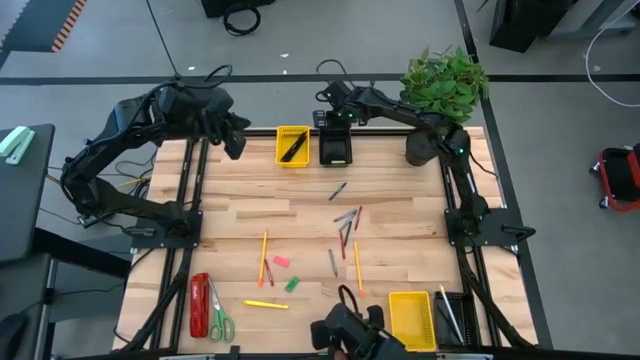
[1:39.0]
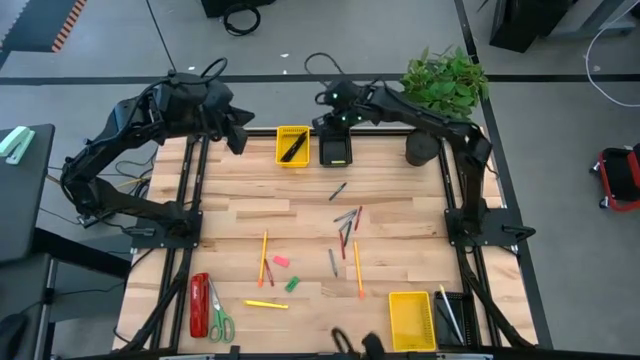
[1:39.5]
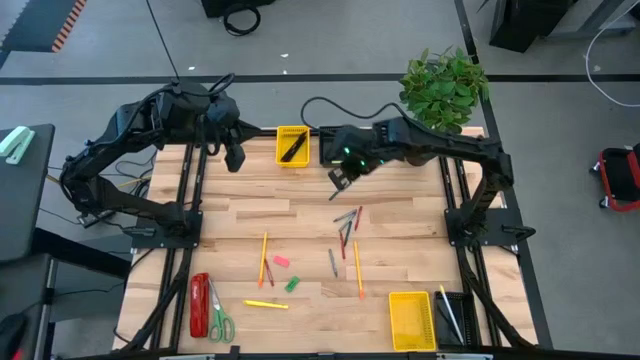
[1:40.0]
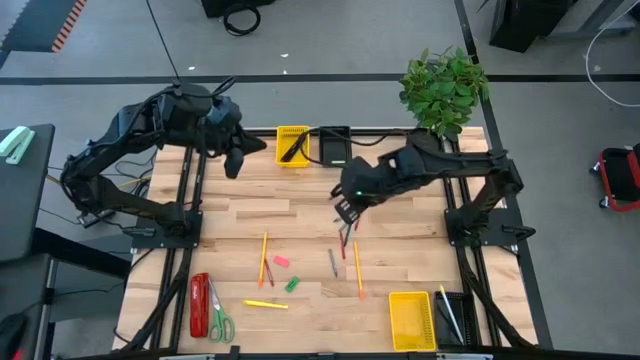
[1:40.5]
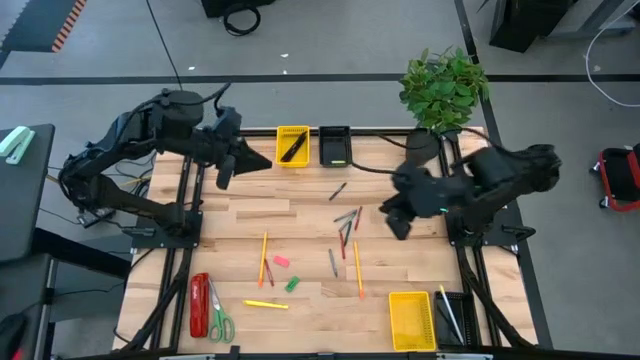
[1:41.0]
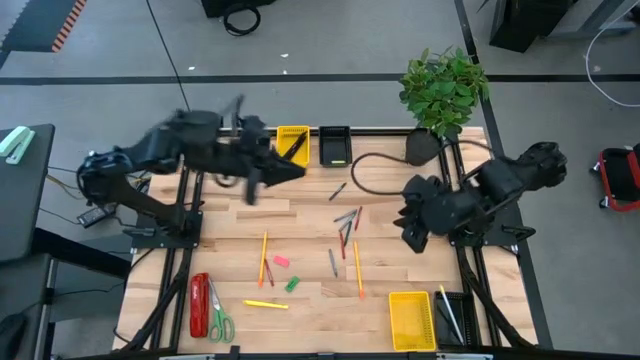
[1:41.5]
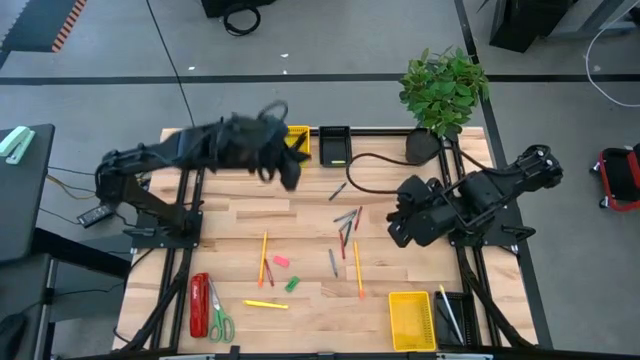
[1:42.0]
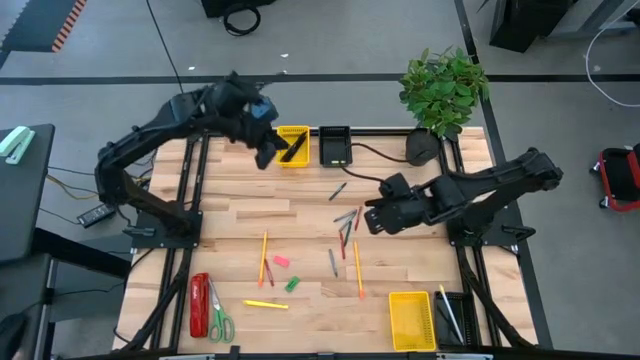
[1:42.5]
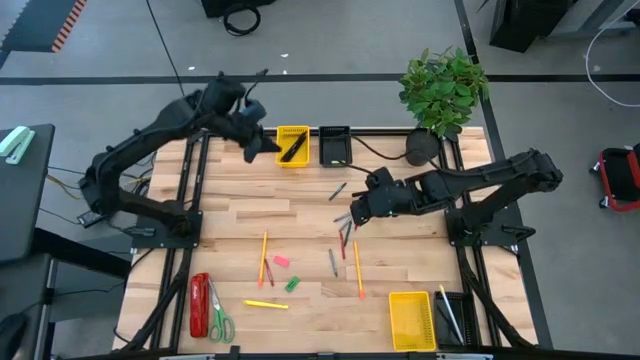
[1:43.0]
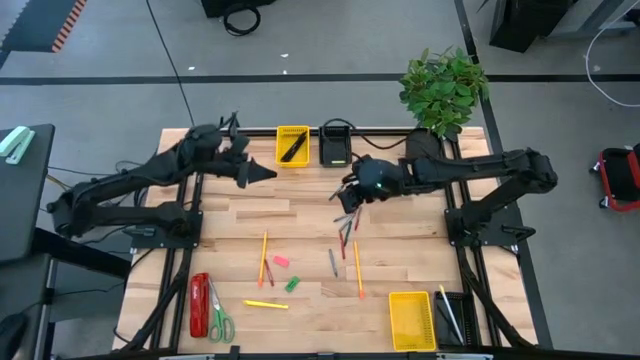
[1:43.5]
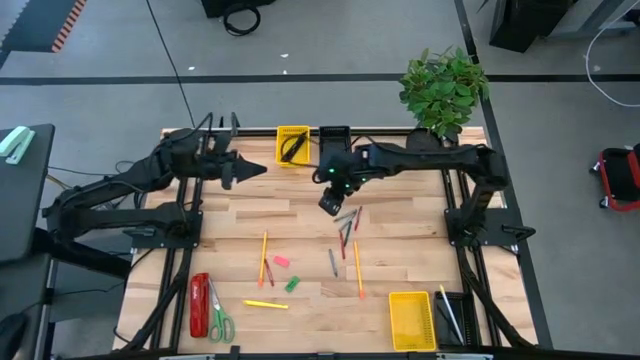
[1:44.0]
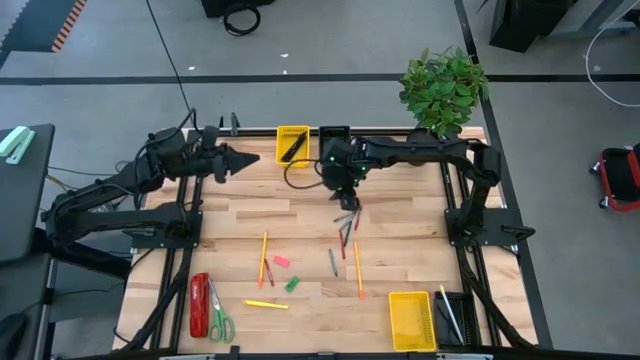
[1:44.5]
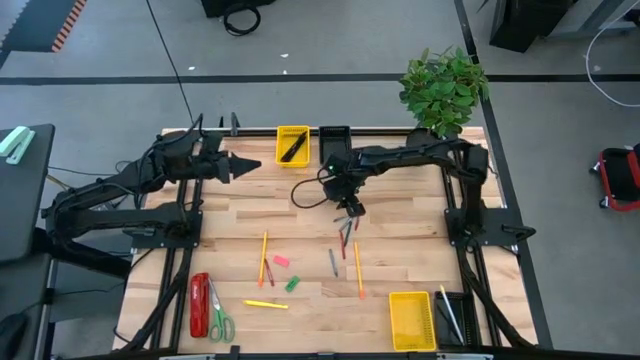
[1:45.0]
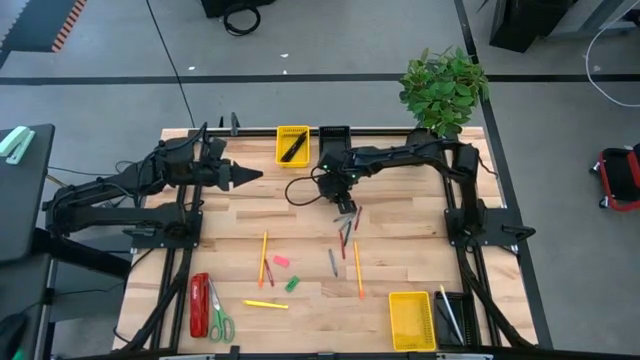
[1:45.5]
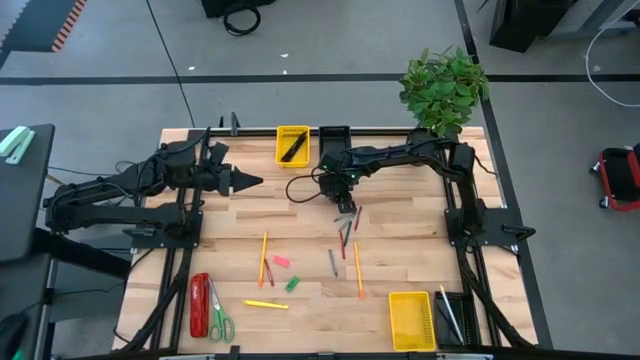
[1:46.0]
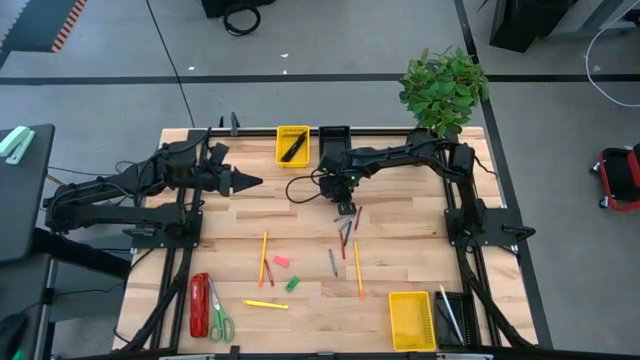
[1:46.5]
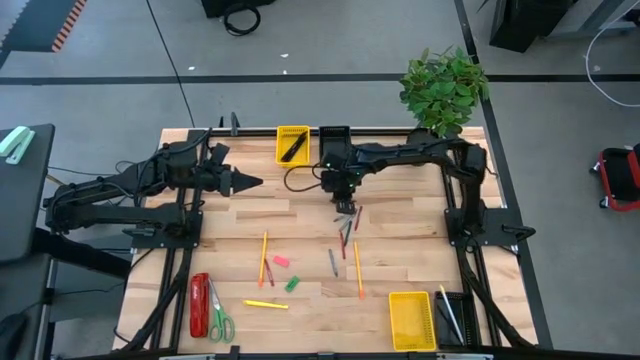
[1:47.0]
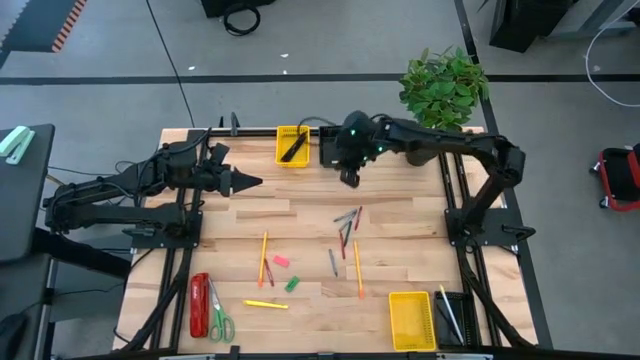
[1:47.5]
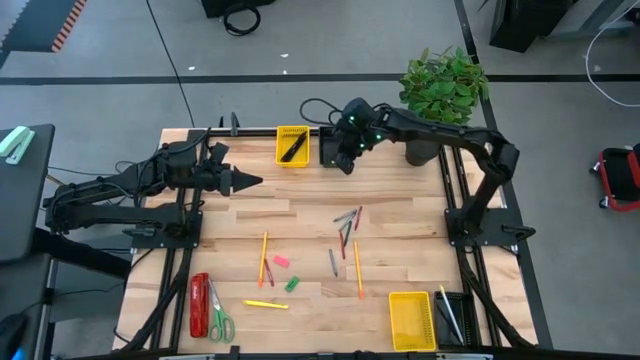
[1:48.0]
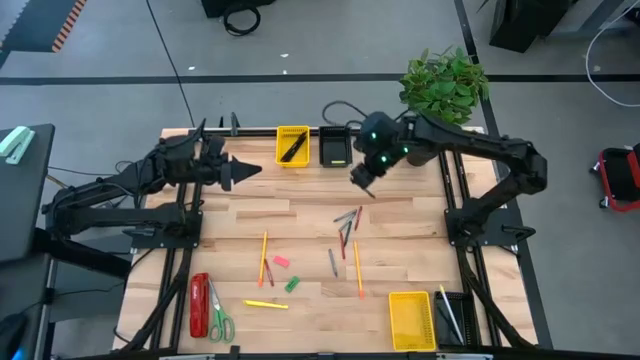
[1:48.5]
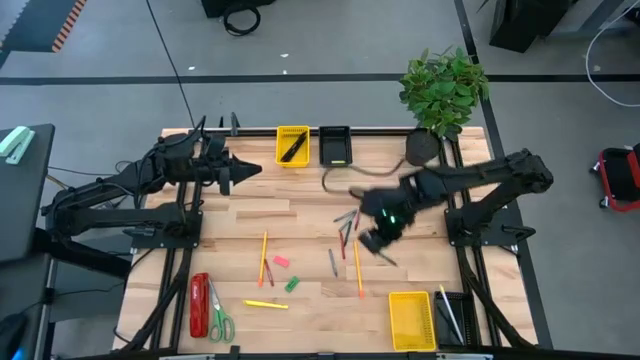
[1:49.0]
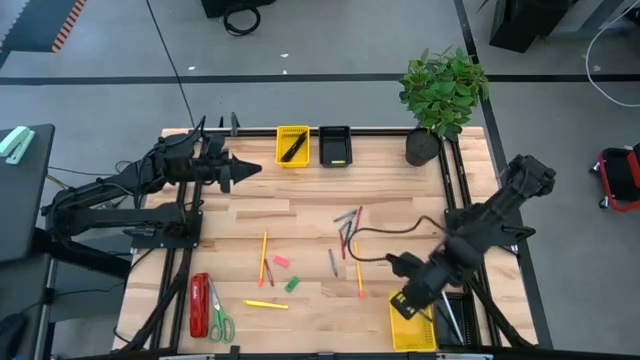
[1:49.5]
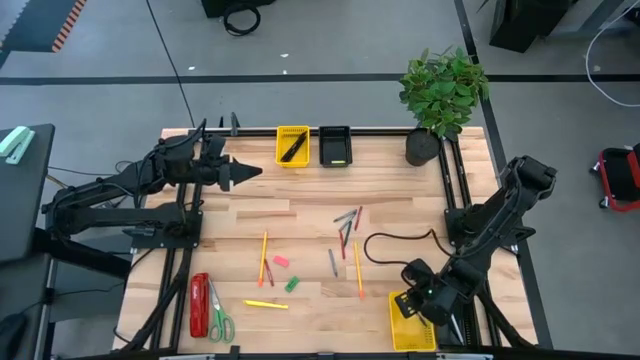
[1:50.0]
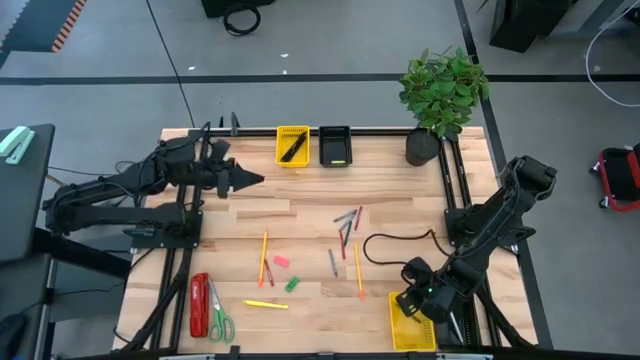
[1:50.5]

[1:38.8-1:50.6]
Task: Sort crayons/erasers/pens/pencils in bins
Put the top green crayon into the bottom yellow bin

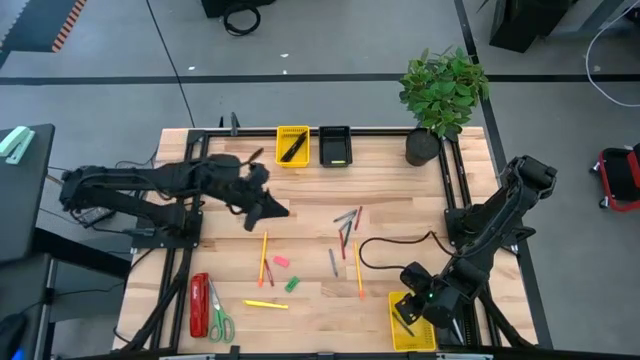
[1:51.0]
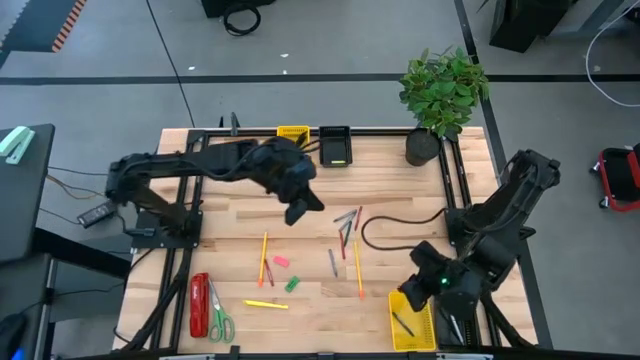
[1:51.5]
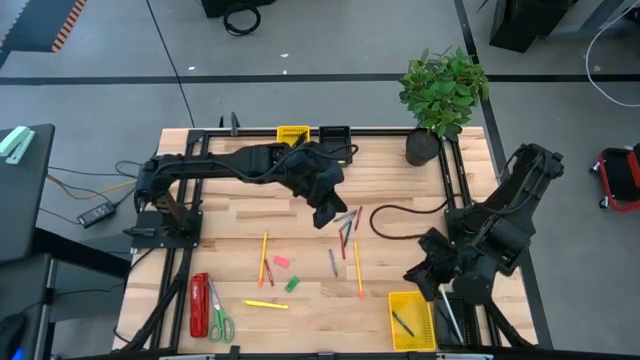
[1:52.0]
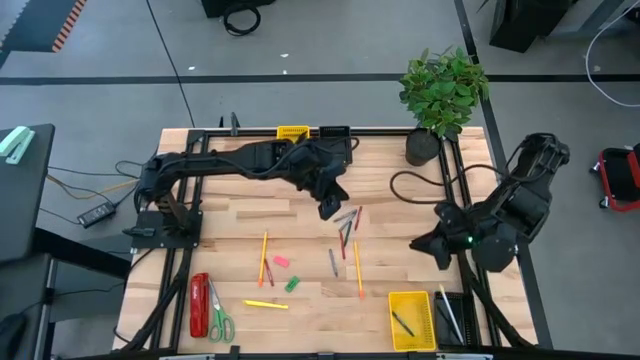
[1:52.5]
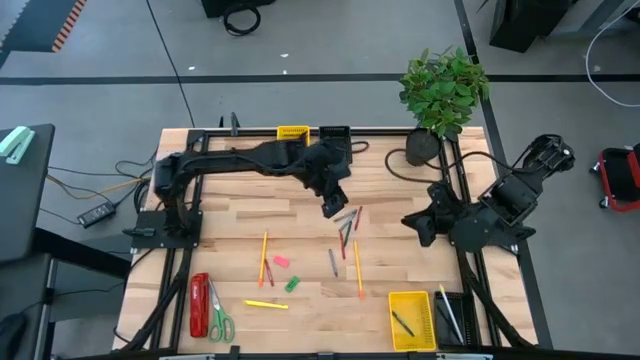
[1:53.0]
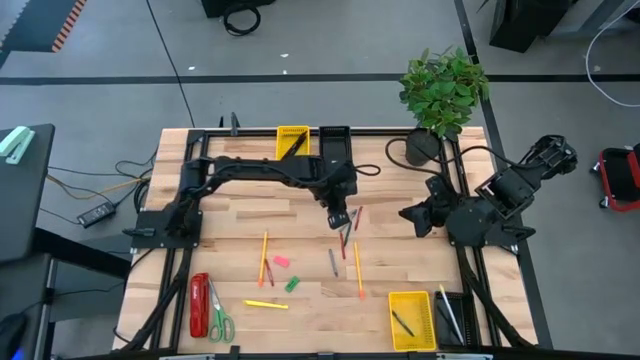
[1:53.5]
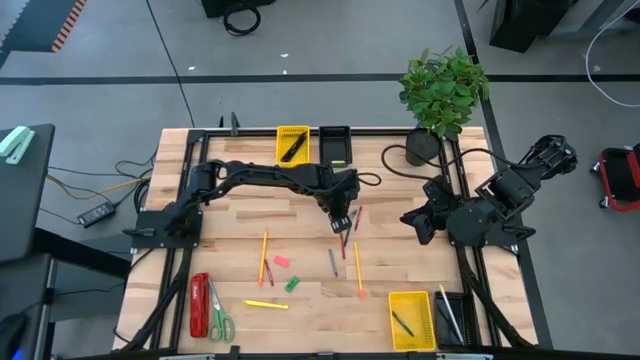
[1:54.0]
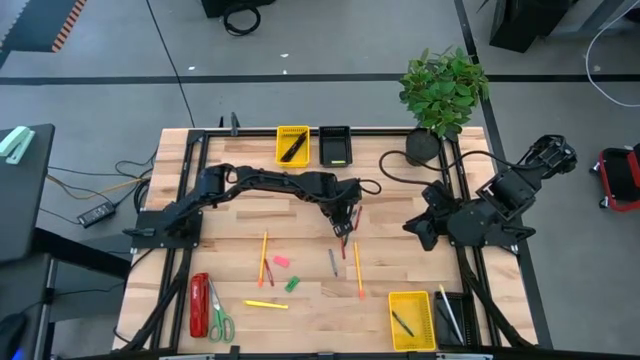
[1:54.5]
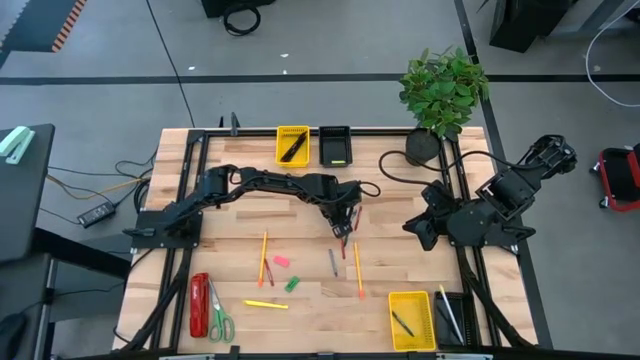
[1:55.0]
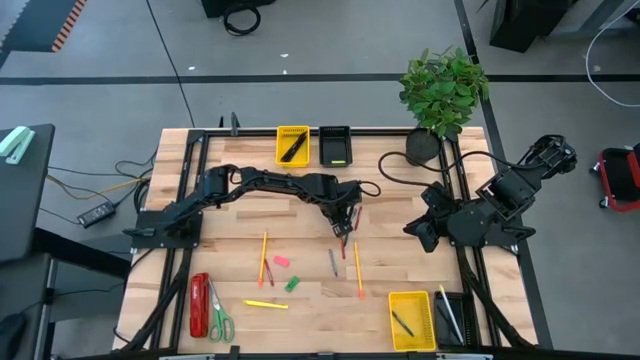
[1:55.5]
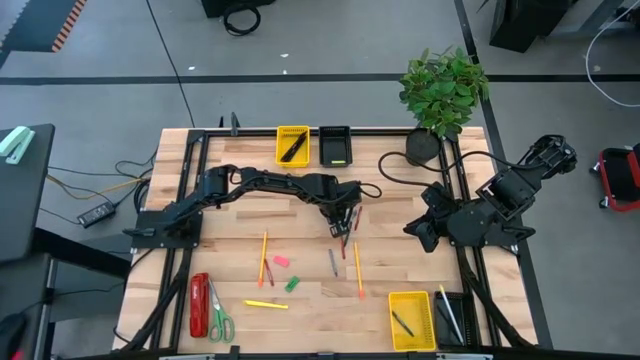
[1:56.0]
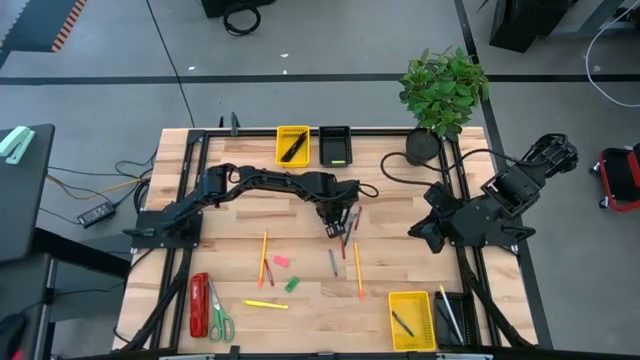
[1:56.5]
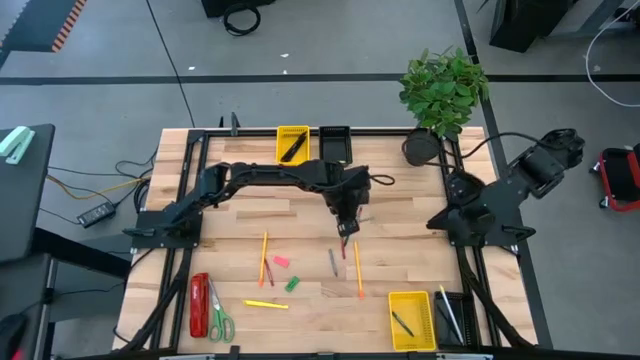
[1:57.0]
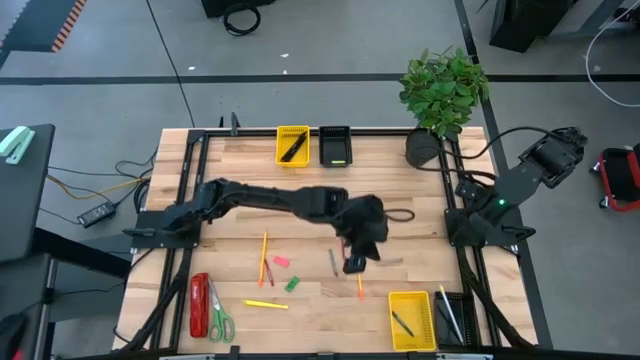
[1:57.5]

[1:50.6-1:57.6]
Put the top left gray crayon into the bottom yellow bin

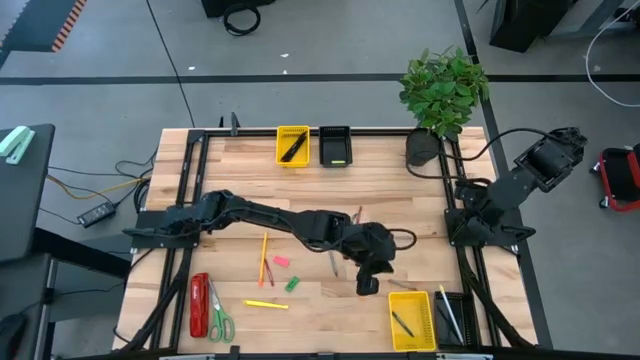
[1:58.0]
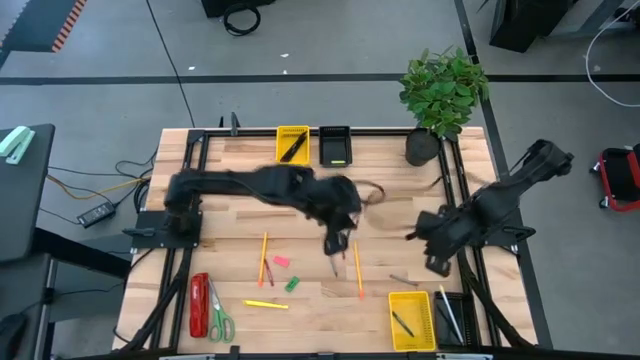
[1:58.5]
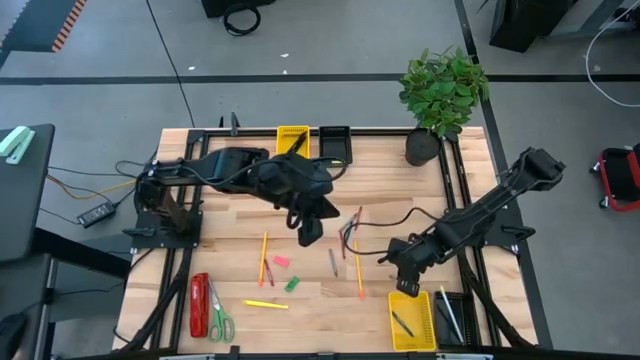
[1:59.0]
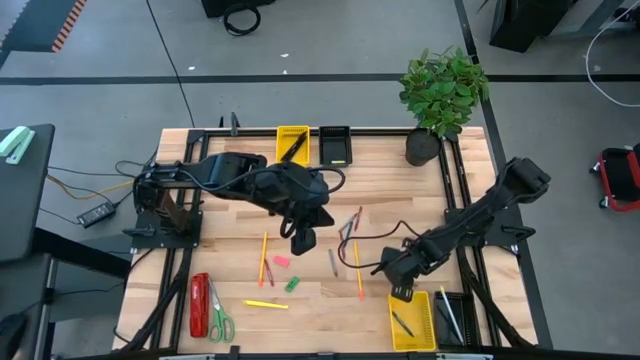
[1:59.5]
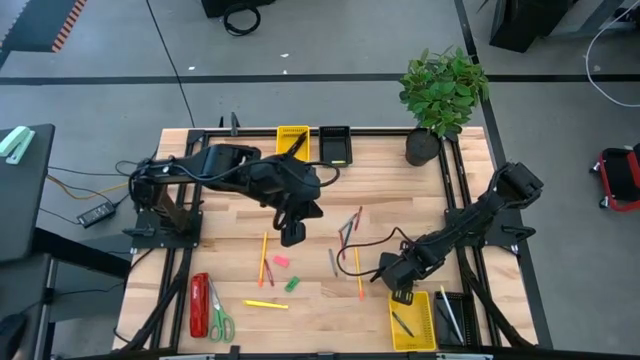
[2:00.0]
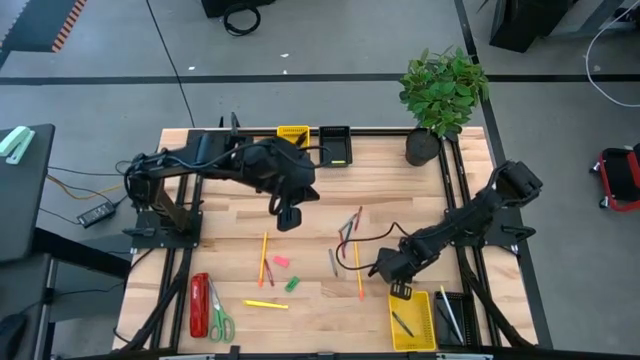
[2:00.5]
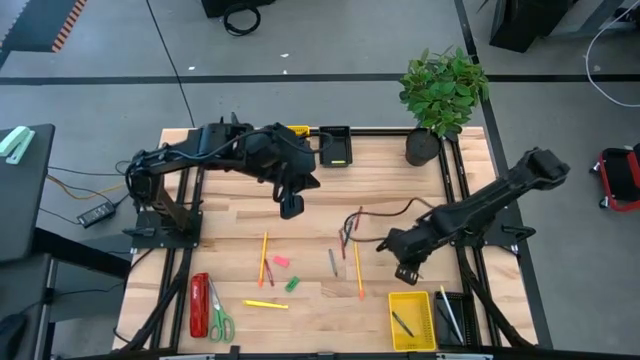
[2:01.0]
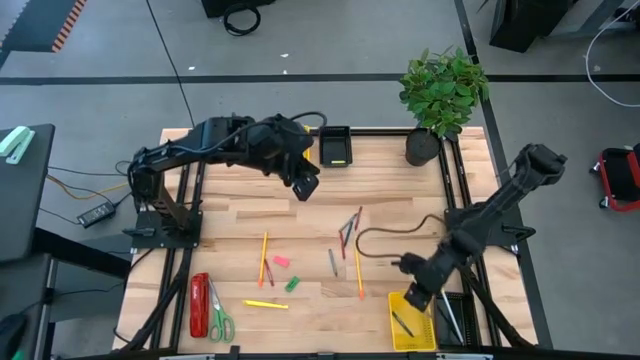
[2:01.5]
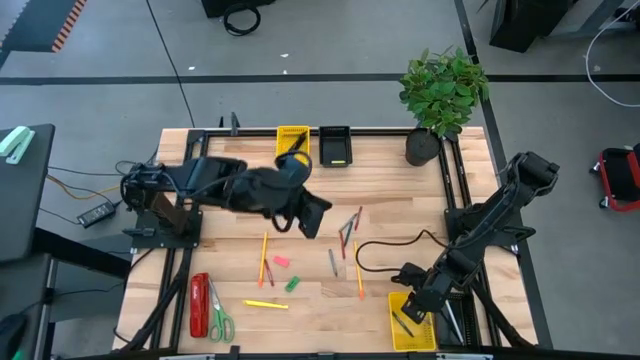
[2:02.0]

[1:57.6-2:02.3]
Put the top left gray crayon into the bottom yellow bin
